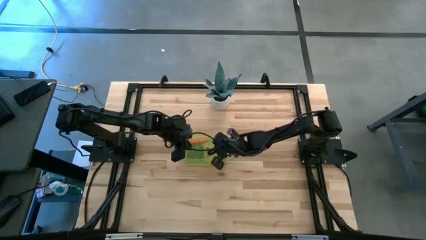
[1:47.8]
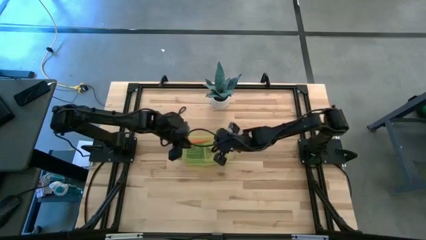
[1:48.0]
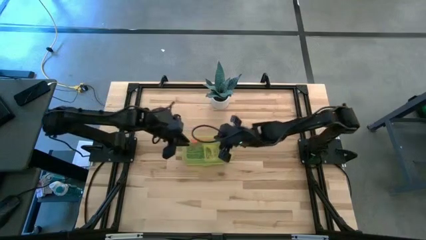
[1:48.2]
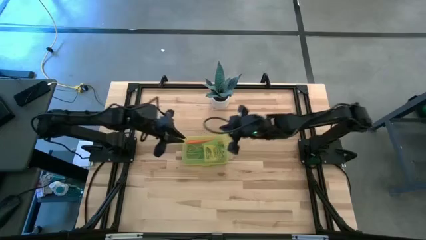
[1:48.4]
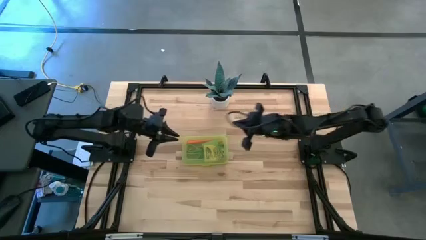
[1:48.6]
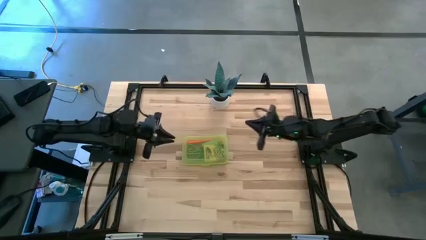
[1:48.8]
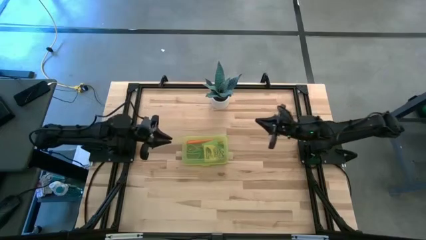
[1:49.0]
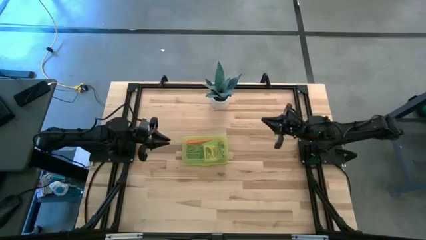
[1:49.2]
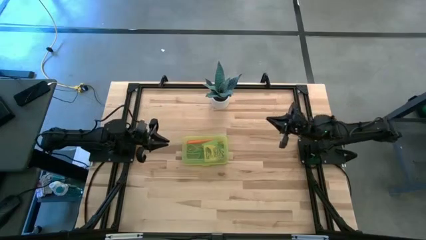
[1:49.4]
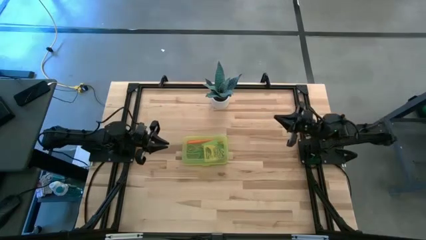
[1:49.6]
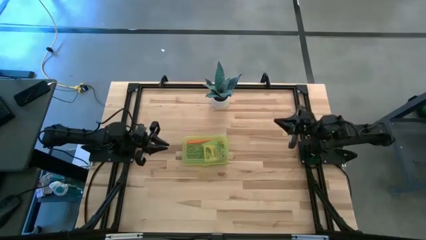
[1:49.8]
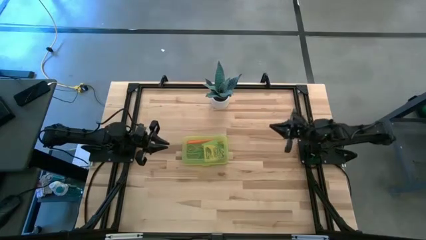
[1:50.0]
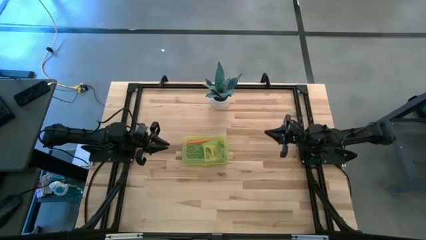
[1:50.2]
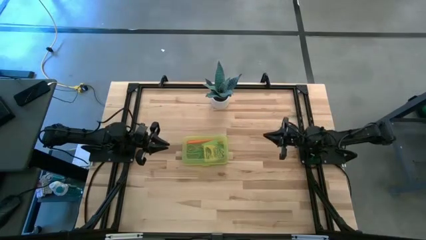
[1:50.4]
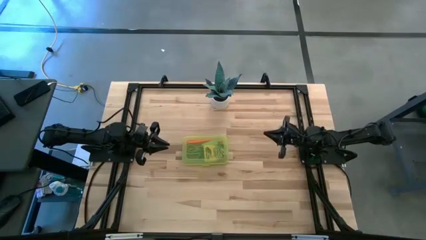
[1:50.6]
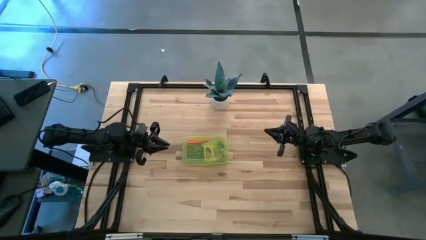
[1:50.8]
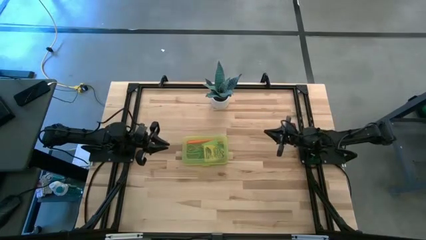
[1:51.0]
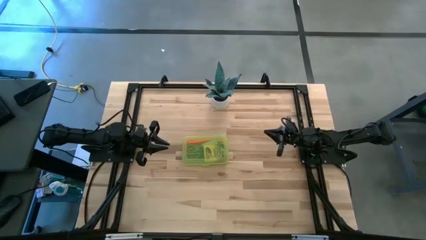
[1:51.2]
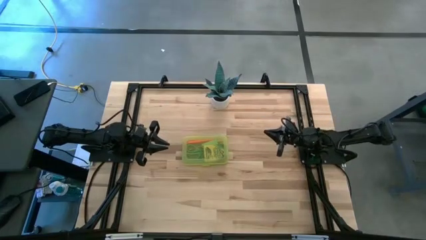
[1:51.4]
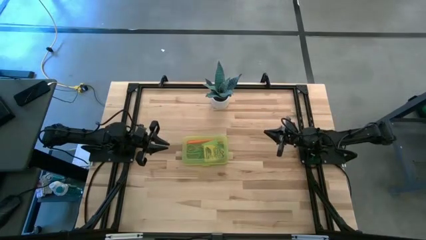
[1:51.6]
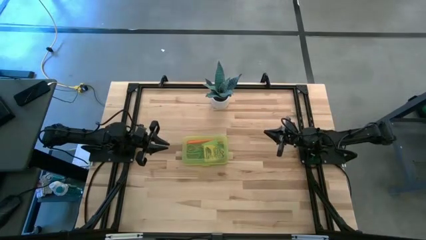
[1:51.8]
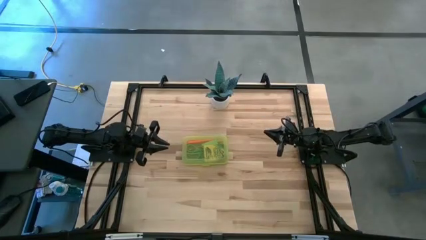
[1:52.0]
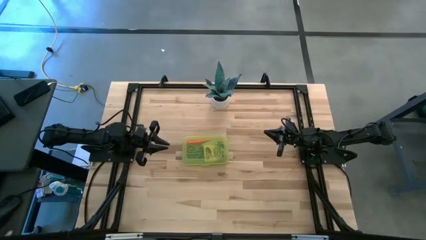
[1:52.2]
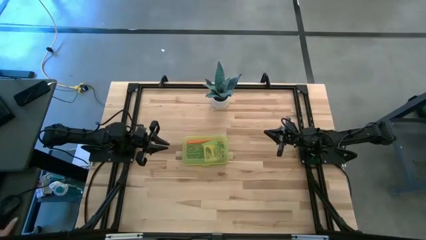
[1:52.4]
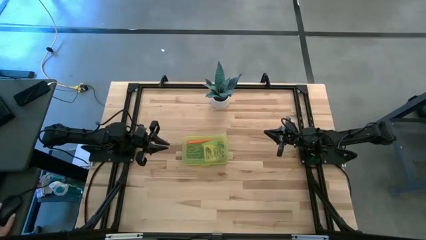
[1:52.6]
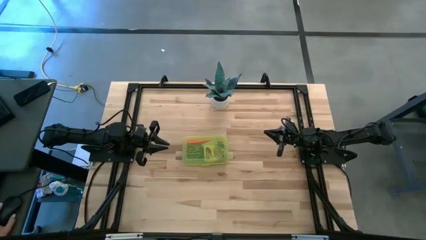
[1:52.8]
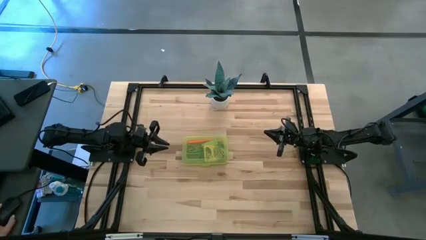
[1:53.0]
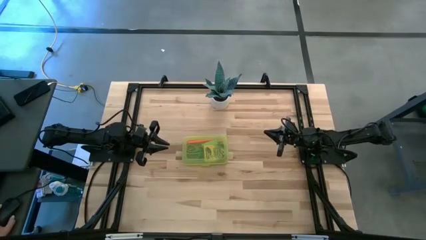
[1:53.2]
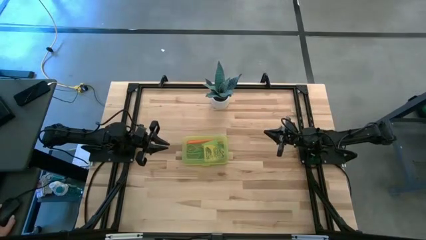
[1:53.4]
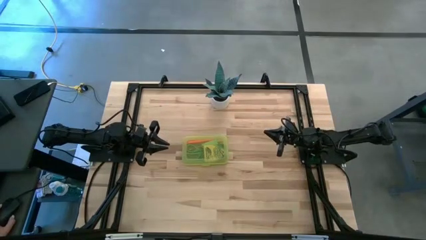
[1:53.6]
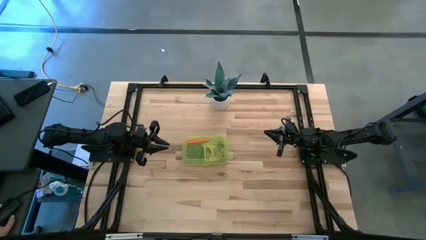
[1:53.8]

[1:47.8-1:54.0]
Task: Pack school essentials
Return to Home Position

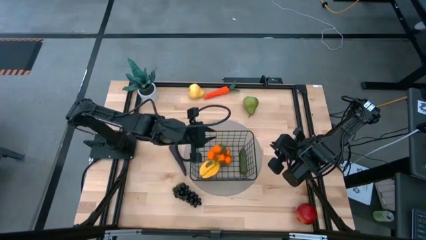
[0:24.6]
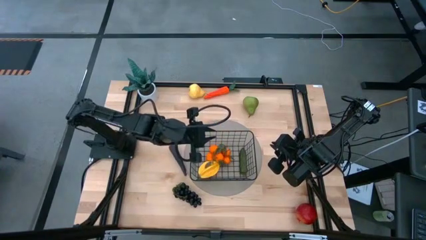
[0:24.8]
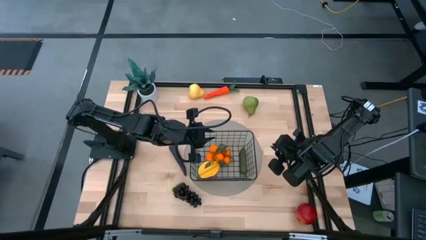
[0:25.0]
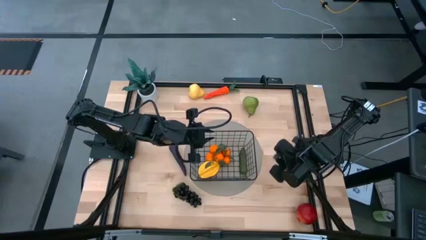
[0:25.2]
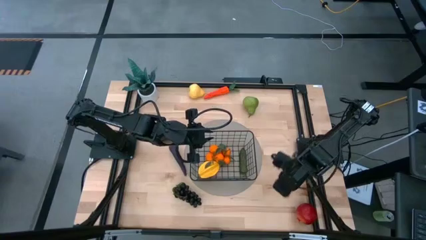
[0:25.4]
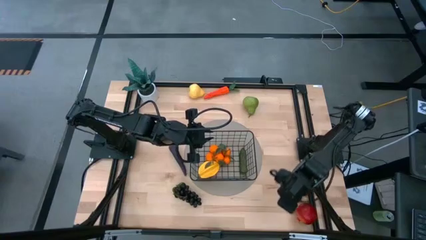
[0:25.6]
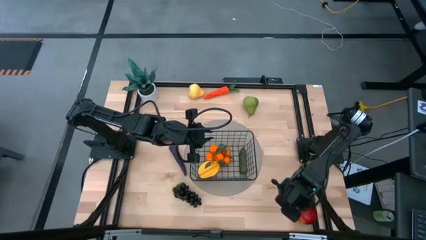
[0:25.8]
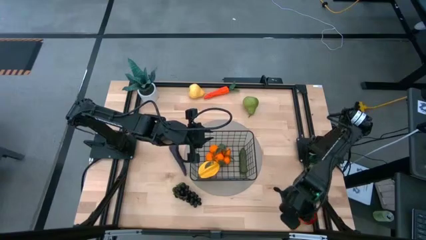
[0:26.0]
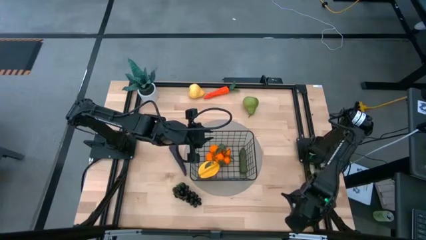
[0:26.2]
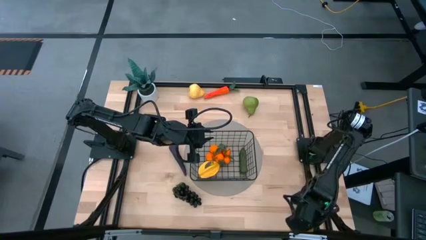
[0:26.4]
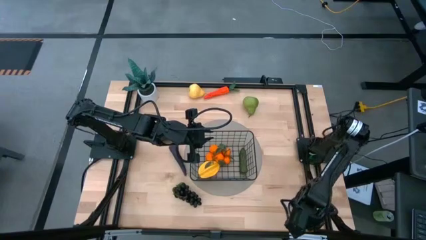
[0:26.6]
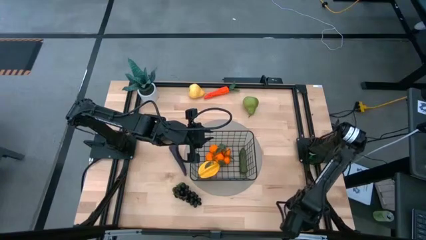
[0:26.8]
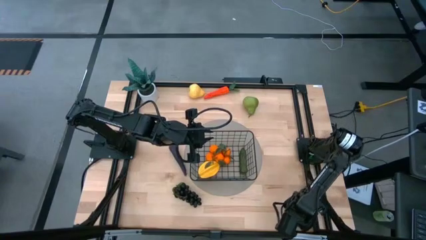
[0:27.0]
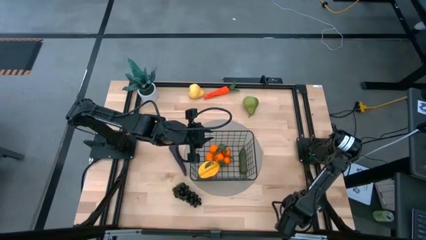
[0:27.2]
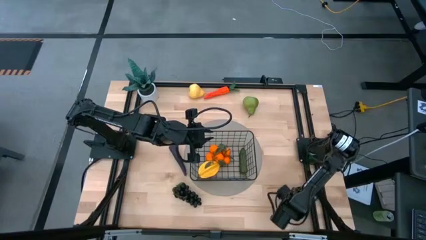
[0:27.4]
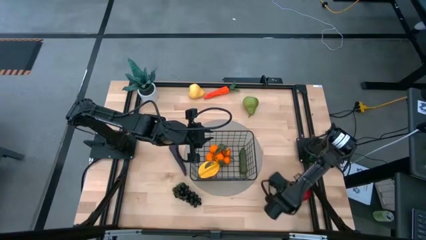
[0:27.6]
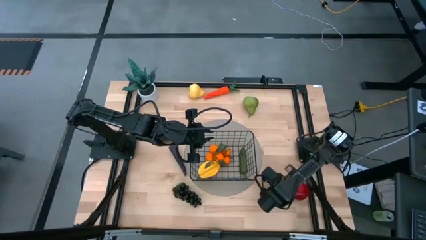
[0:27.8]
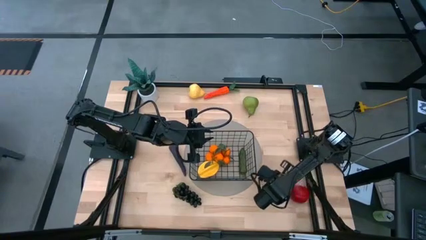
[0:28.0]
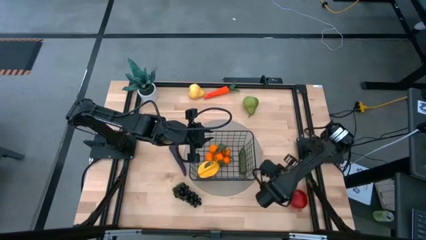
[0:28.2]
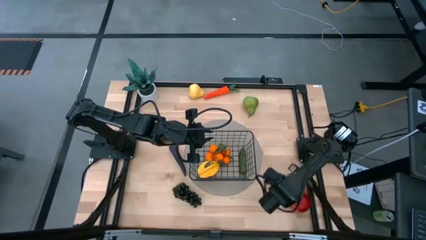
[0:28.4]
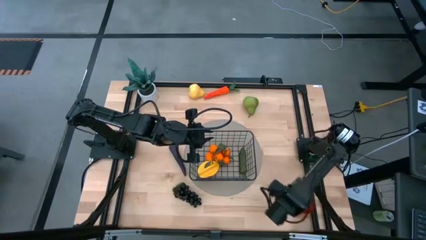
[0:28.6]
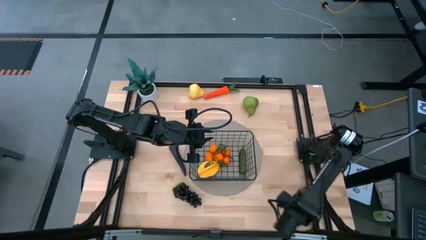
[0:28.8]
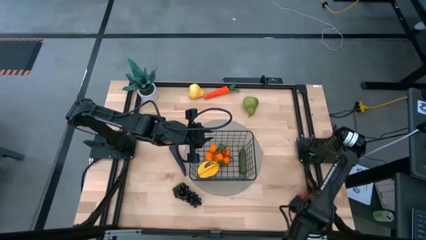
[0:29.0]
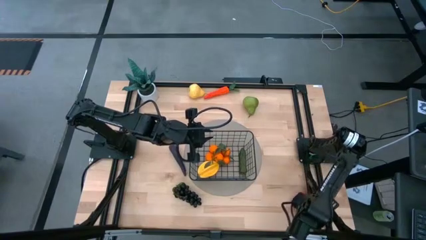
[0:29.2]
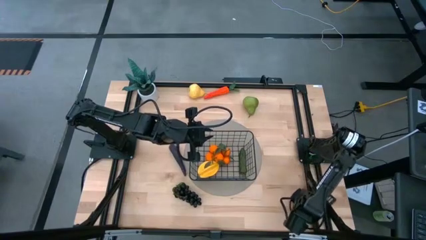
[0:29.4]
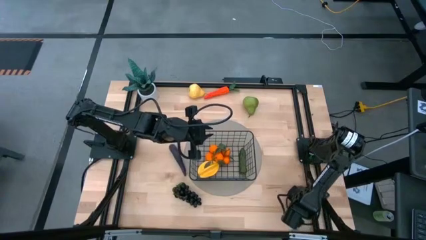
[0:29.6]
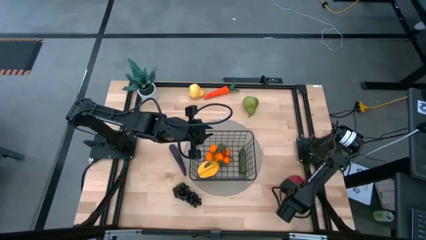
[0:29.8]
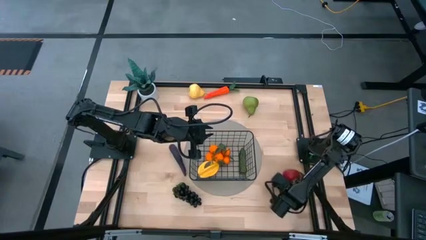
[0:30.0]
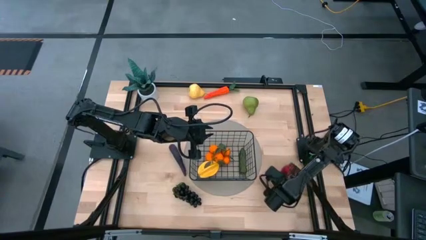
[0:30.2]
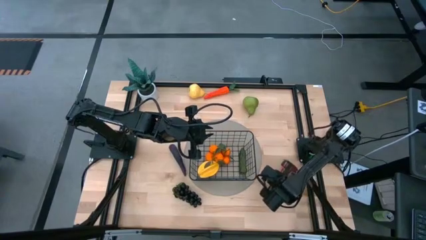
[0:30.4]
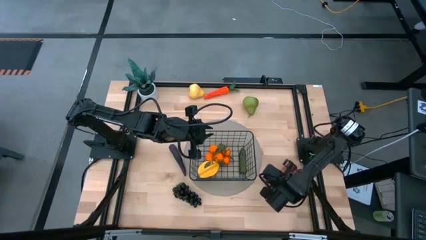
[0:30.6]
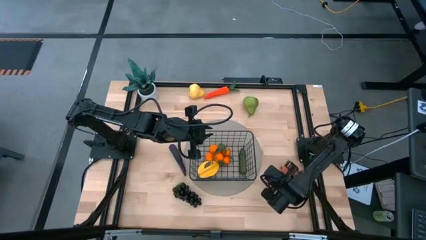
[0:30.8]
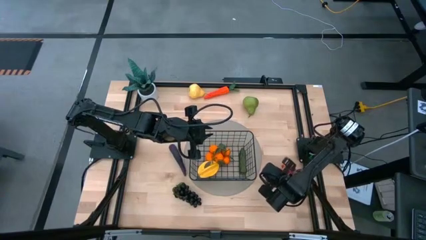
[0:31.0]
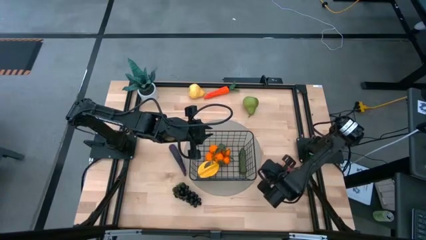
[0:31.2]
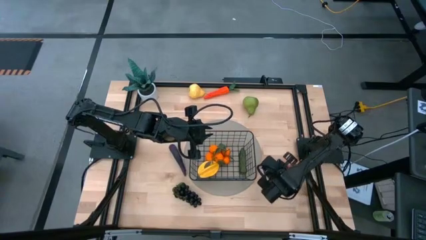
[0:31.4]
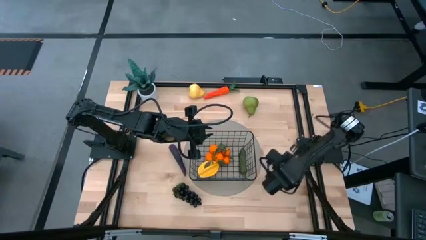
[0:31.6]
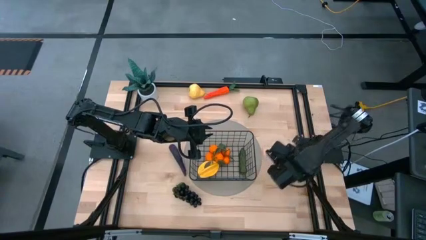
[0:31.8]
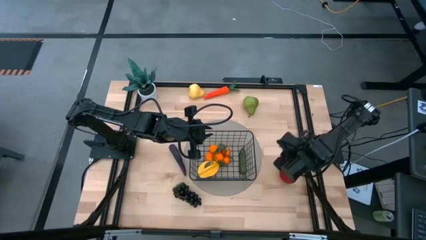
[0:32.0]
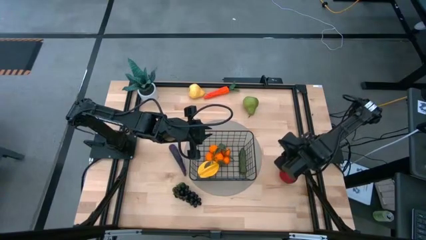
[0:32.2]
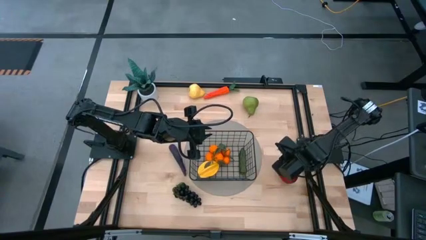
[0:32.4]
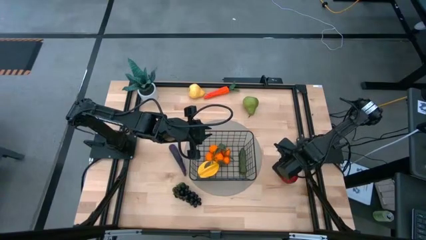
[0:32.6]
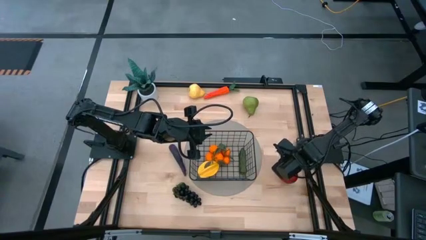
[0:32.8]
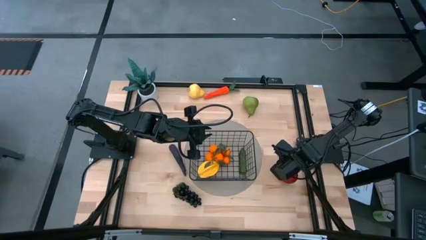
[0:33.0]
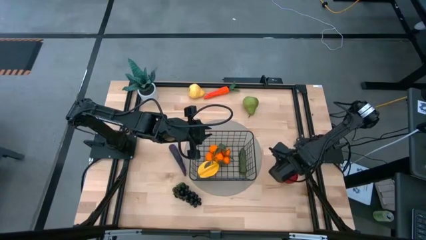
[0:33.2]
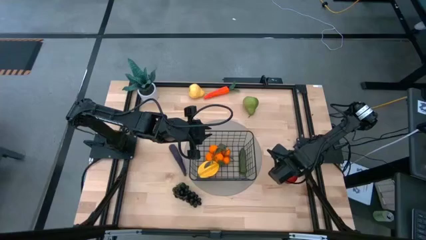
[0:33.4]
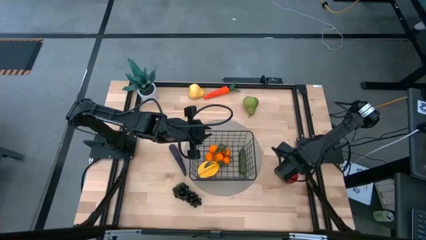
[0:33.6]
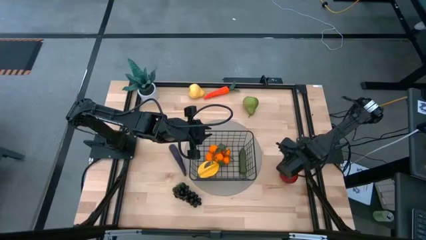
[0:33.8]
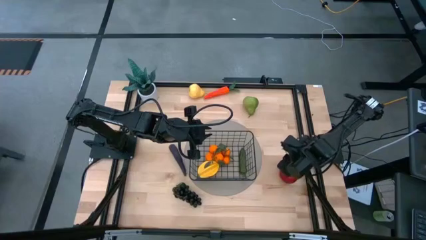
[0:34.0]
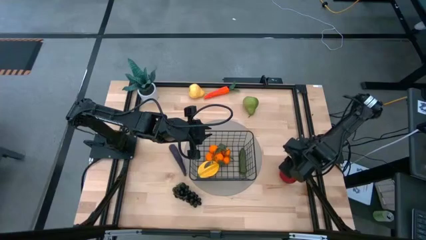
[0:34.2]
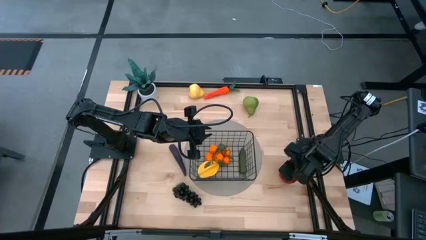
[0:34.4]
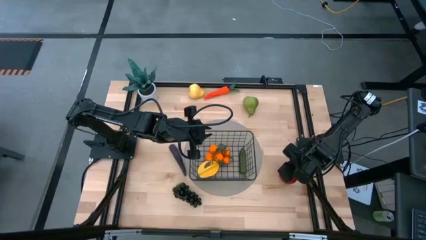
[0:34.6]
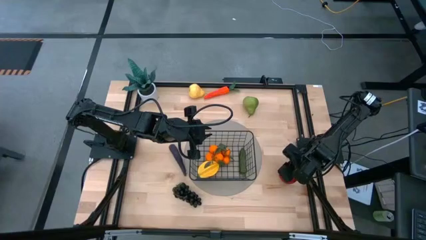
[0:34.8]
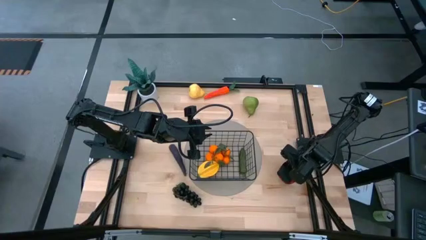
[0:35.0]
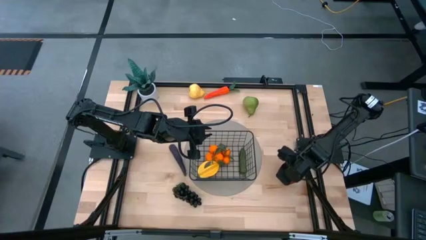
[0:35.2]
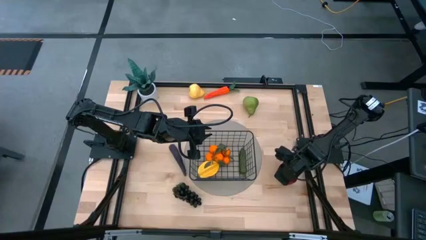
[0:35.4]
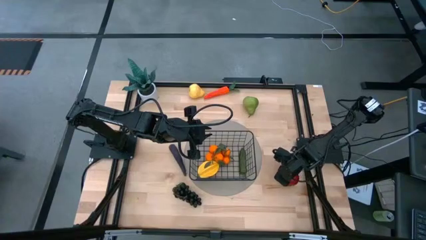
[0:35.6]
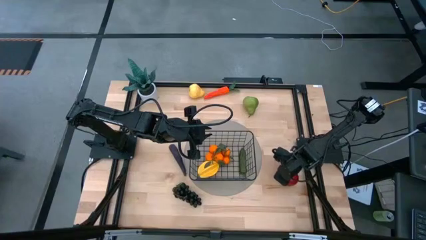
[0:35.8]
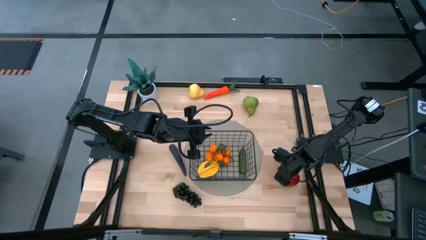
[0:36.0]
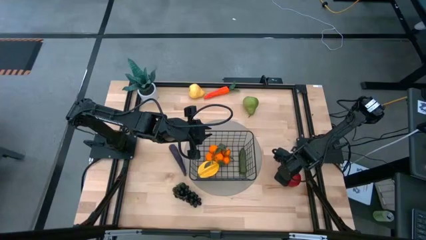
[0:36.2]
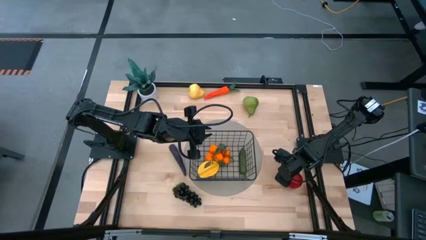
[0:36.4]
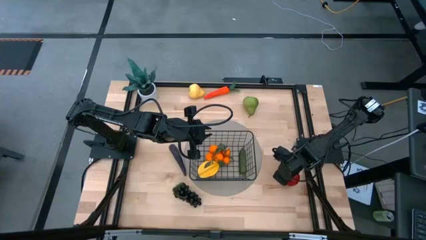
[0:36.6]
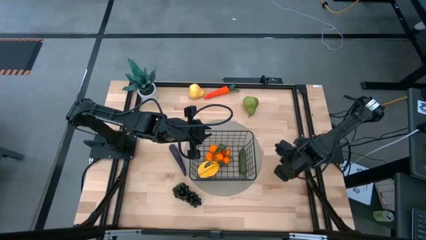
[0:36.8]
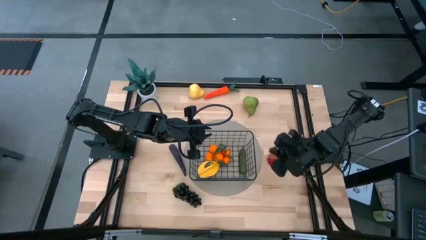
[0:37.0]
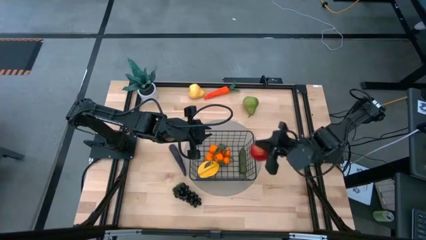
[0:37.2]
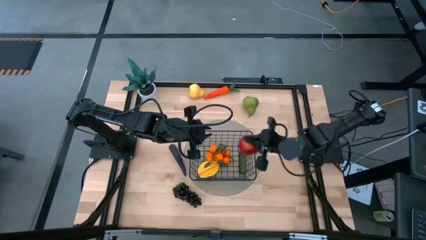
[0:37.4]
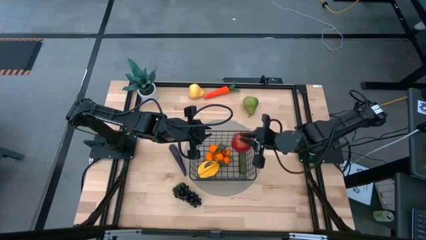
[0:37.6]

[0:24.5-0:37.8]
Task: Build produce basket
Put the red pomegranate into the black wire basket
